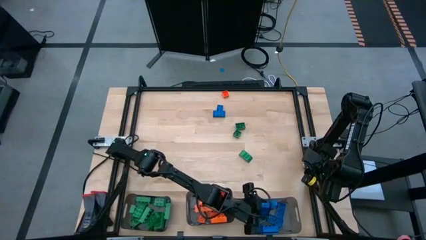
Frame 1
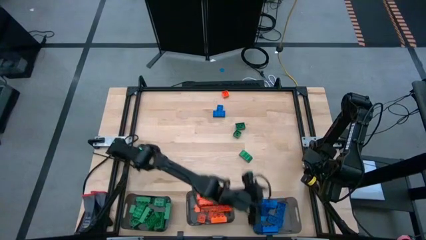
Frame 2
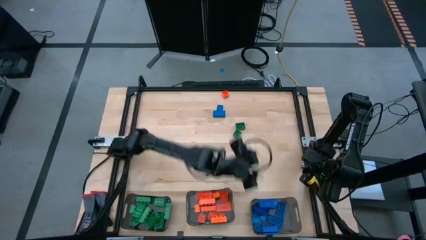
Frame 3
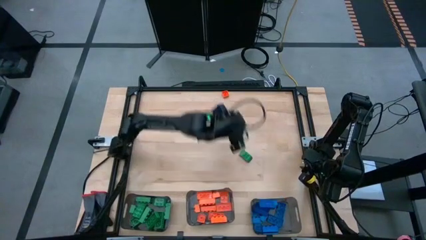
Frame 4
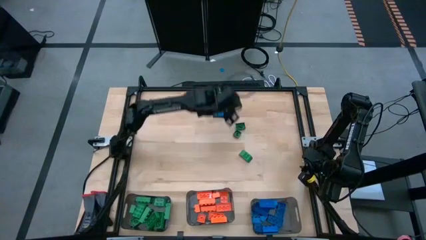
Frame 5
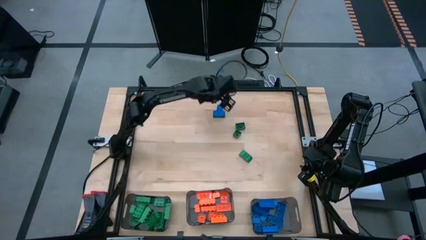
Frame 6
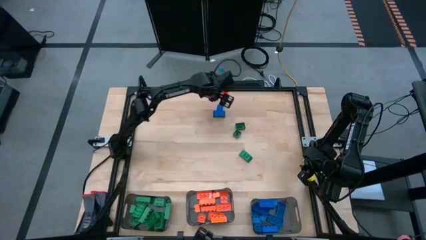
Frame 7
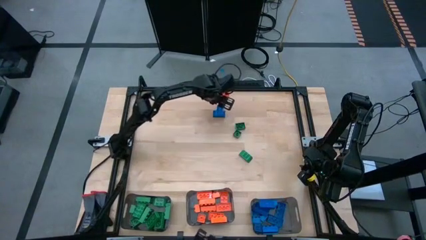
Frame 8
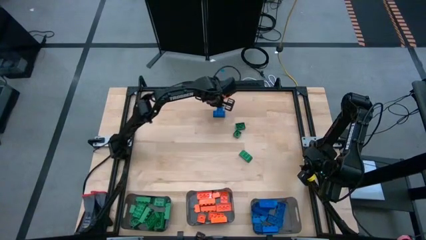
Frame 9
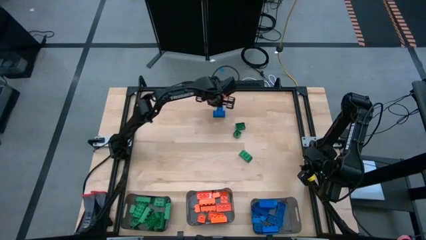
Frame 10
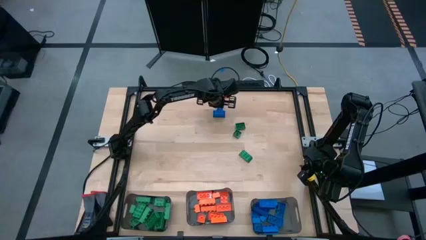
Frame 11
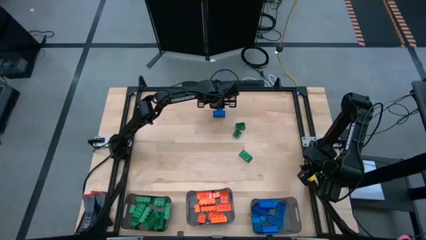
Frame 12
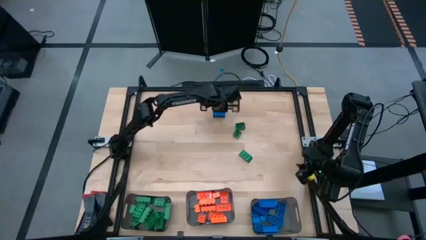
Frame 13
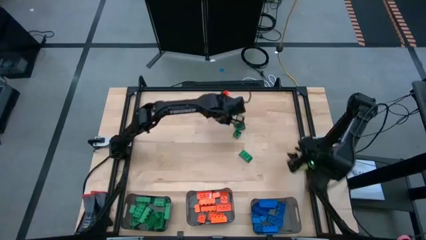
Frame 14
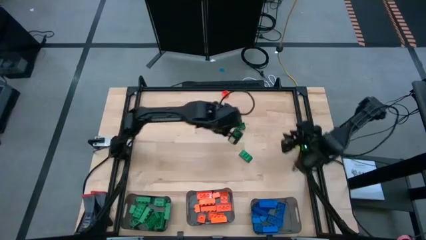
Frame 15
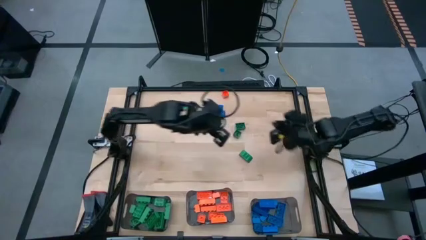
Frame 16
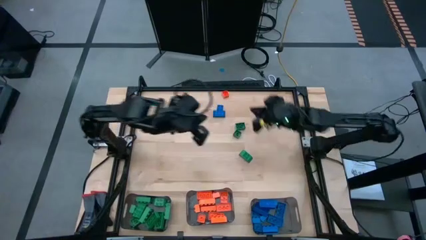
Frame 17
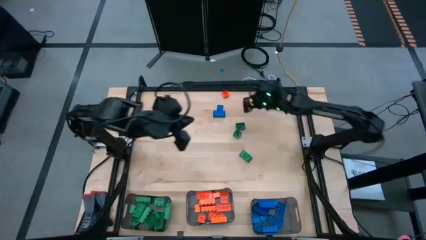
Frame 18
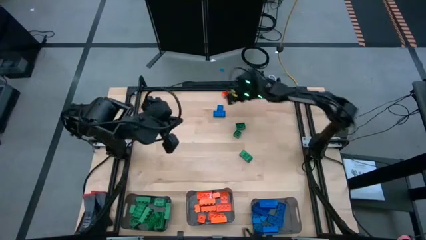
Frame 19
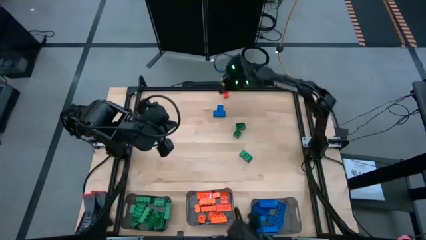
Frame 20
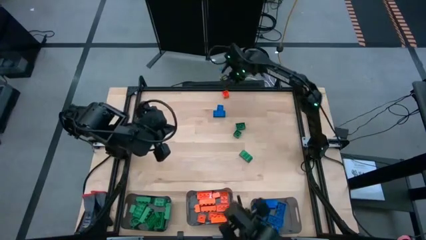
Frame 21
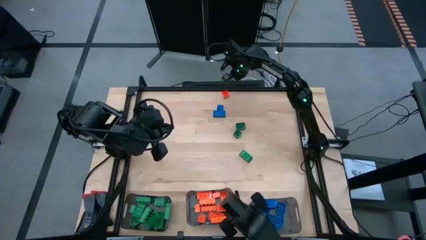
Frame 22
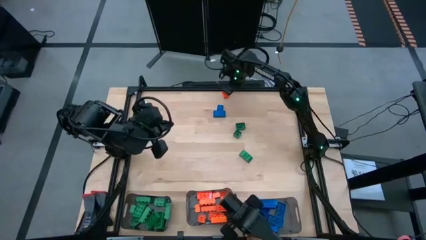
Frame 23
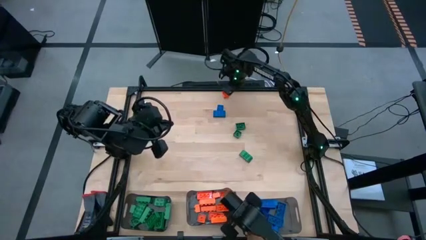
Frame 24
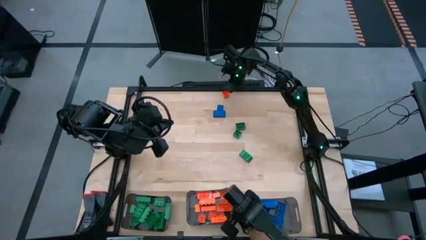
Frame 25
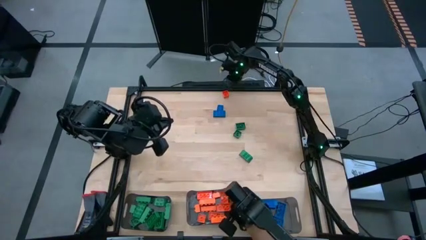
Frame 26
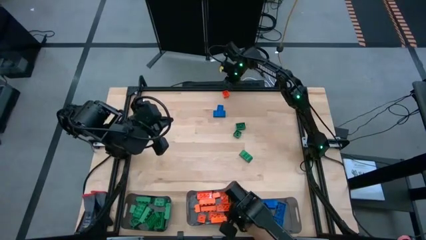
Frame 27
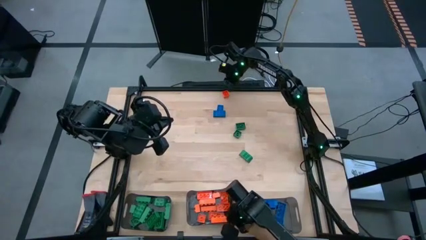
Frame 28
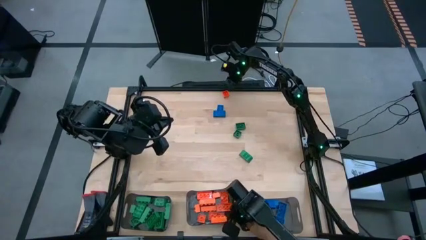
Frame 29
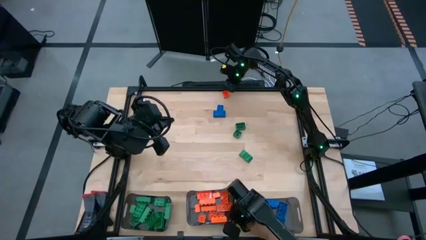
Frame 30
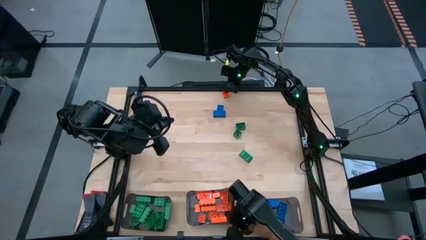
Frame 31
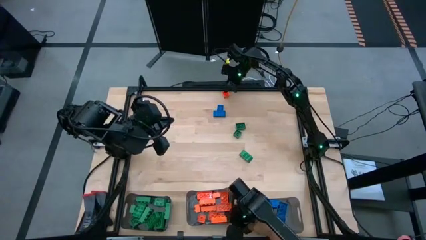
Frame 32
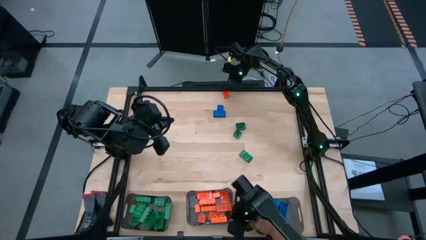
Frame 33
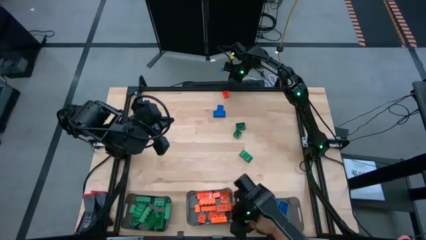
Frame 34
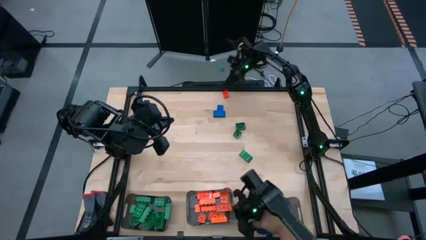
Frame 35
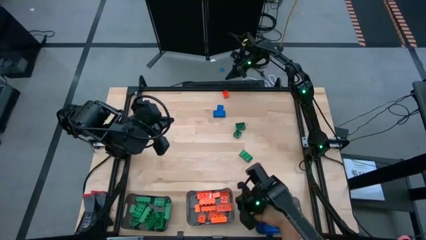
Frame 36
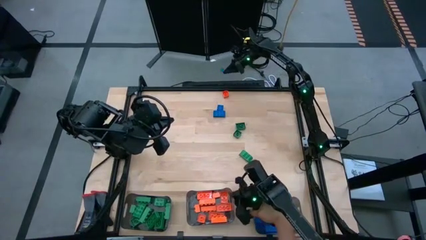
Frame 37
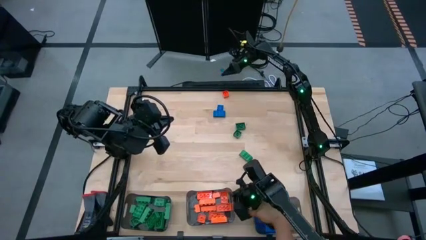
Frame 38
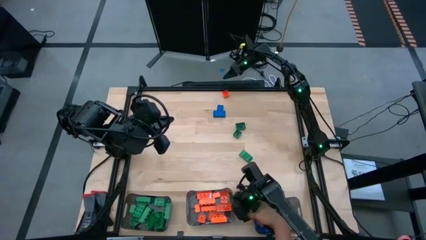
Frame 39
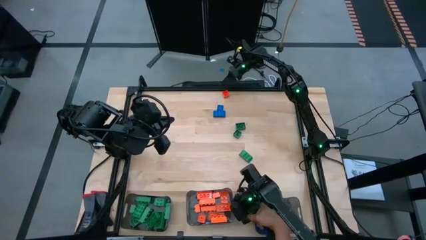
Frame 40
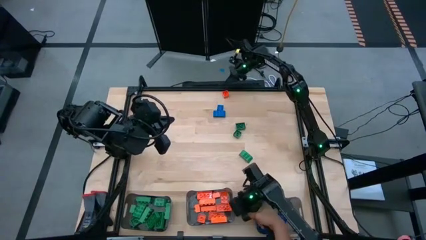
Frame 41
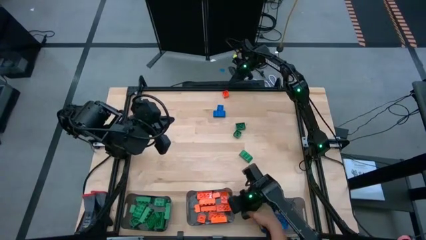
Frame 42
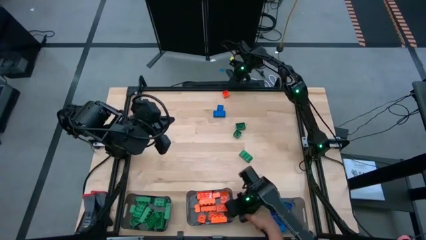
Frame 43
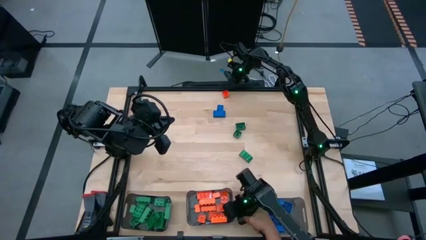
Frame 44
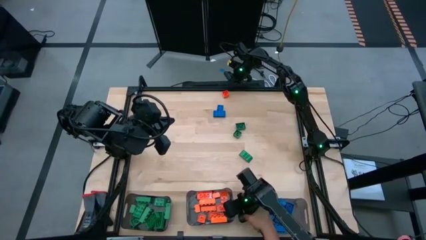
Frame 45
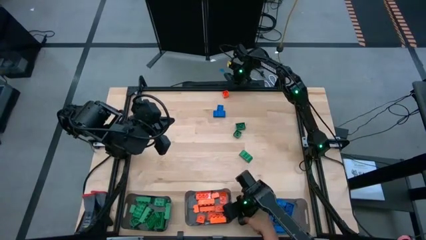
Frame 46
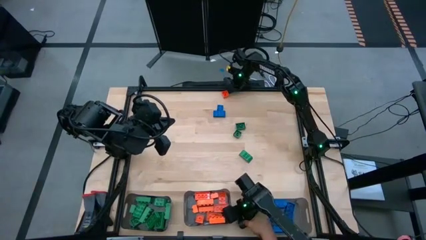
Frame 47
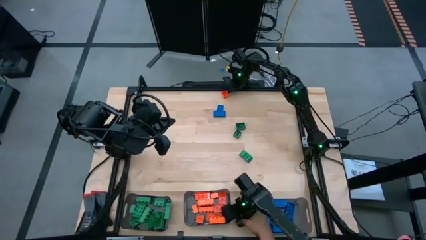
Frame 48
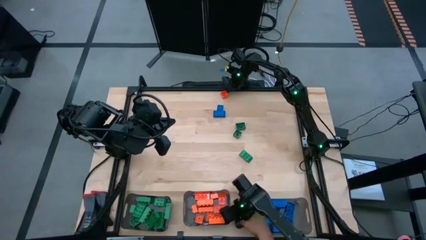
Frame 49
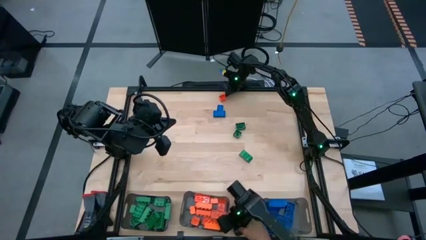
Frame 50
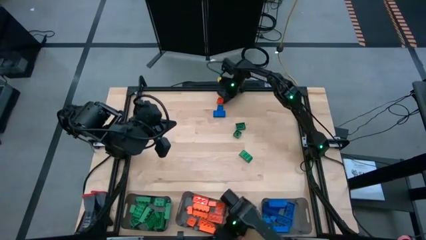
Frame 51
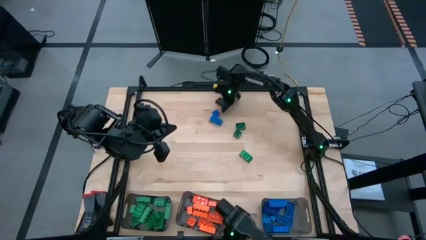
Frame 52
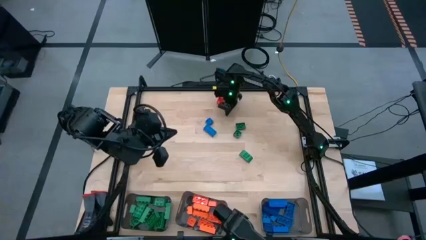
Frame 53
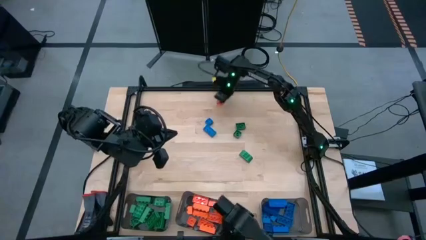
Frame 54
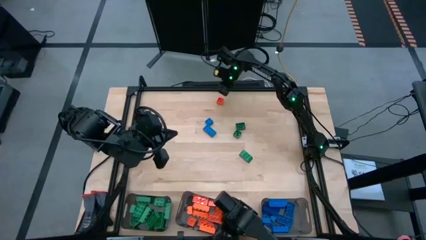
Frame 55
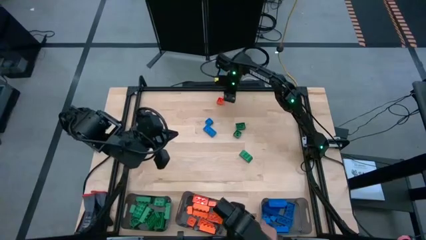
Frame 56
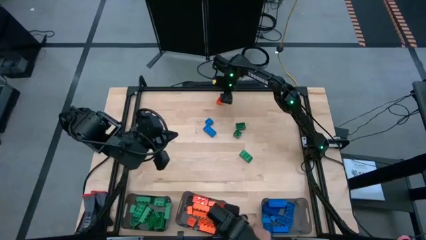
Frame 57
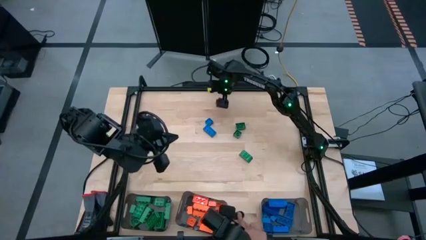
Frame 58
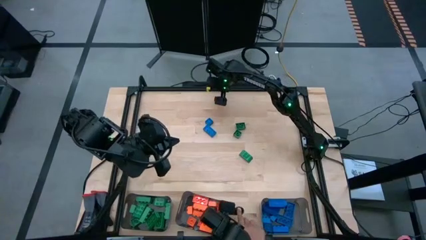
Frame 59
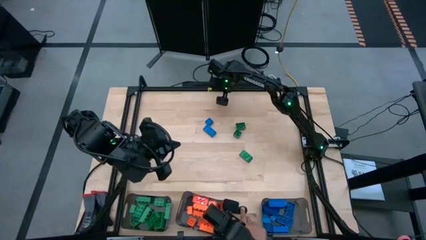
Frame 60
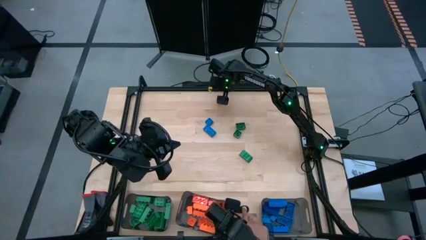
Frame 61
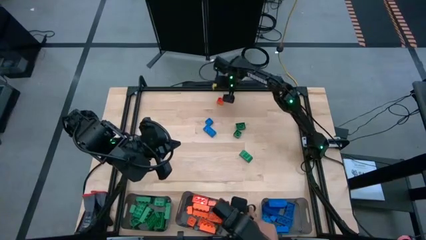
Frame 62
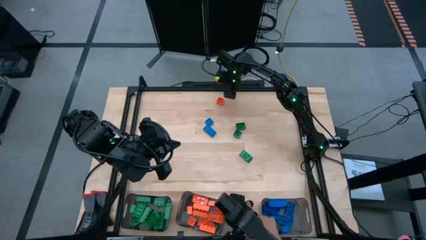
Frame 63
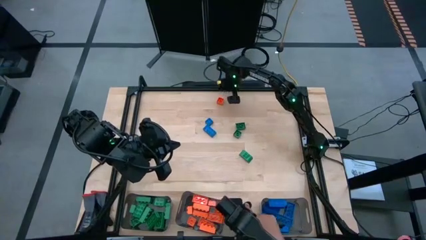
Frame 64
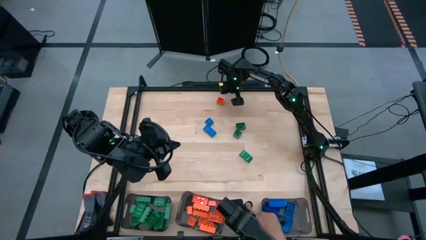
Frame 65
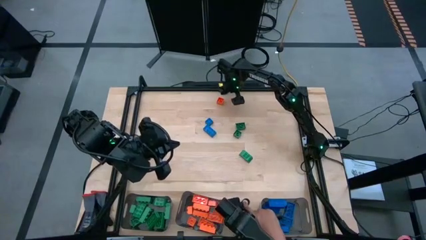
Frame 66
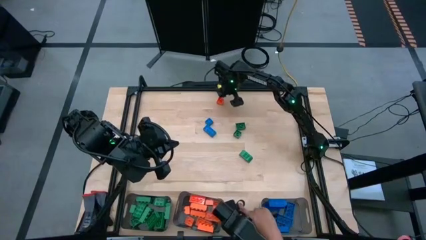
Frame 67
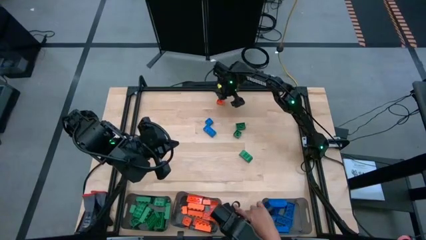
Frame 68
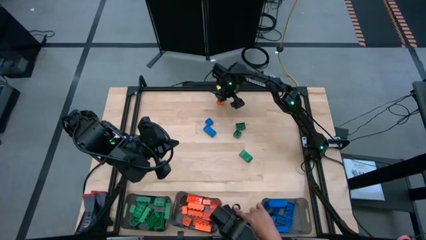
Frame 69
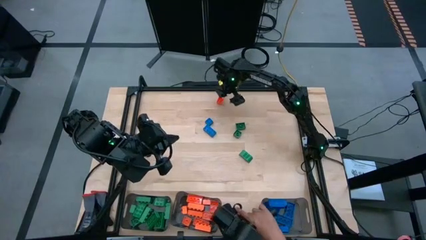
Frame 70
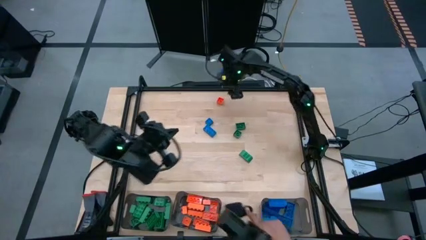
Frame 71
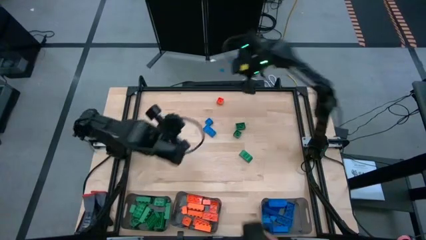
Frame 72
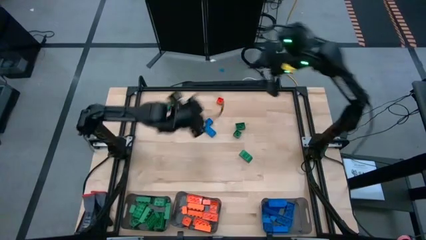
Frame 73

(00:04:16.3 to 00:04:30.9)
Task: Sort blocks
Put the orange game piece into the middle black bin
